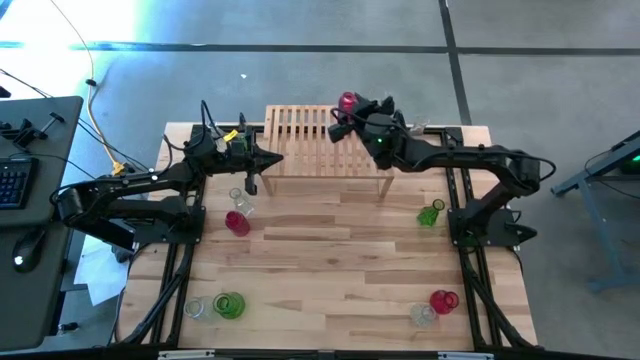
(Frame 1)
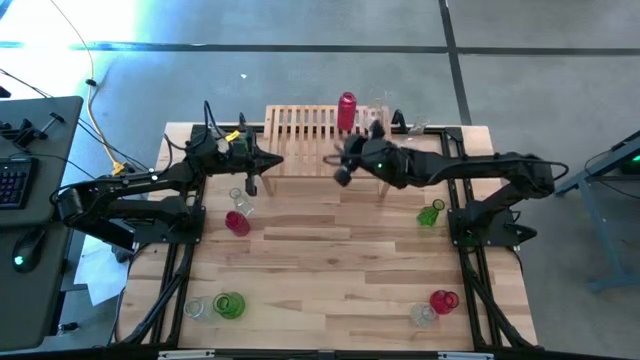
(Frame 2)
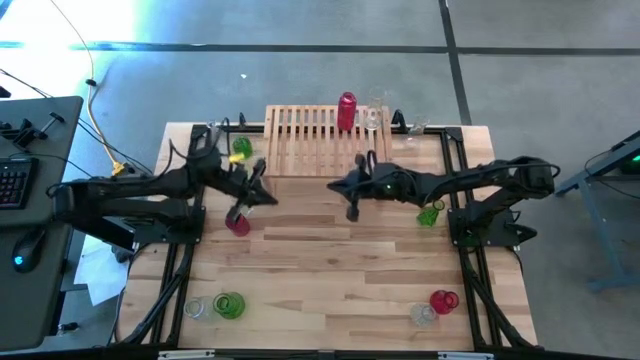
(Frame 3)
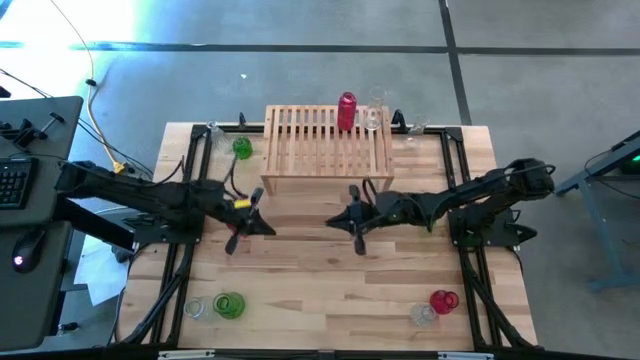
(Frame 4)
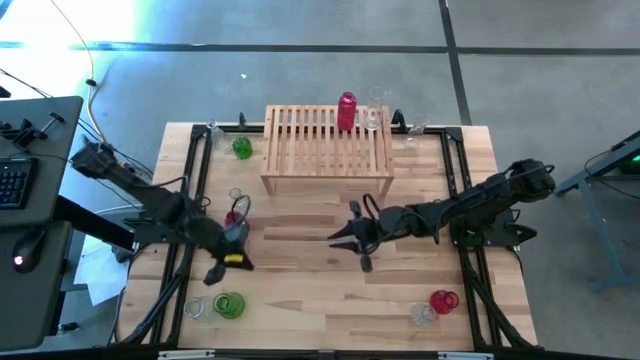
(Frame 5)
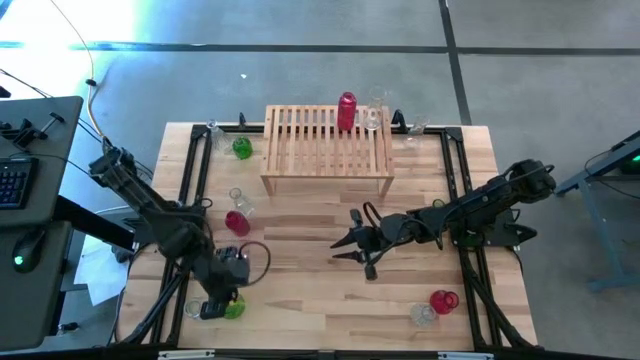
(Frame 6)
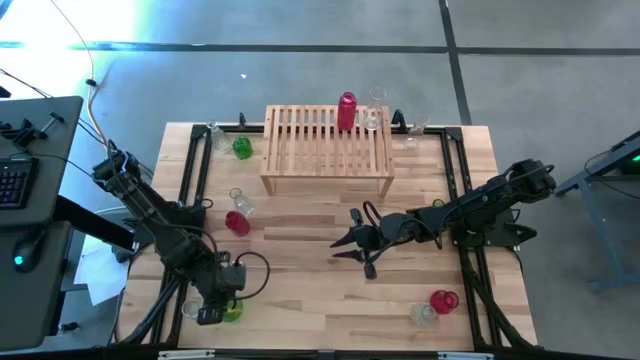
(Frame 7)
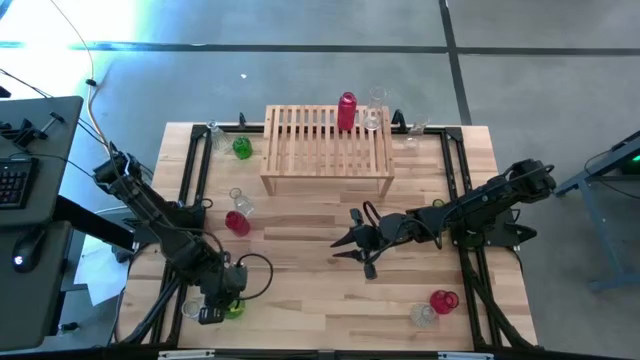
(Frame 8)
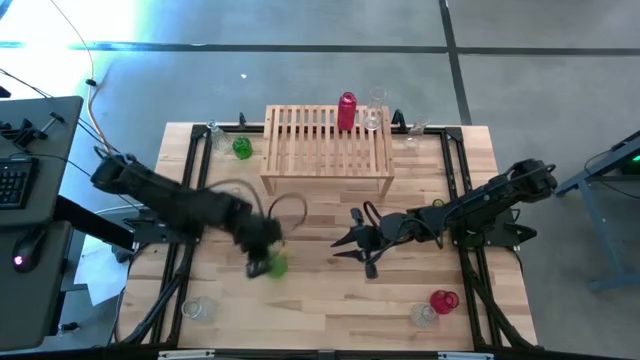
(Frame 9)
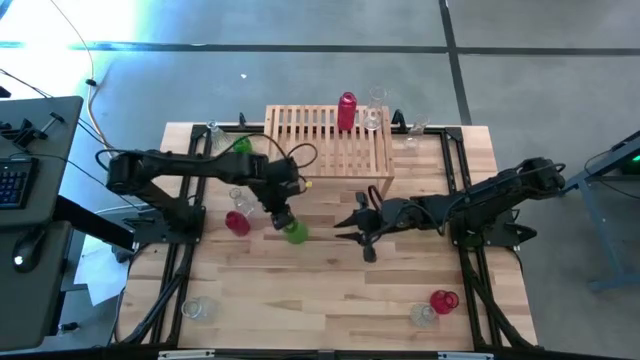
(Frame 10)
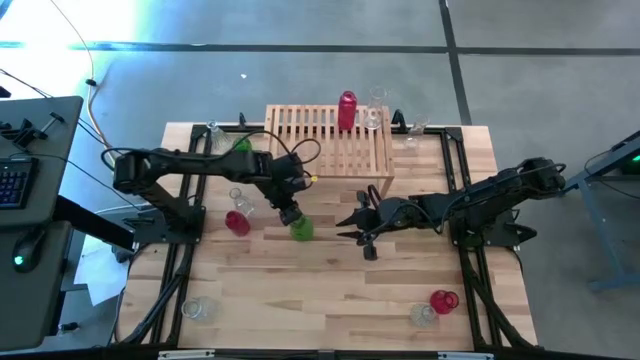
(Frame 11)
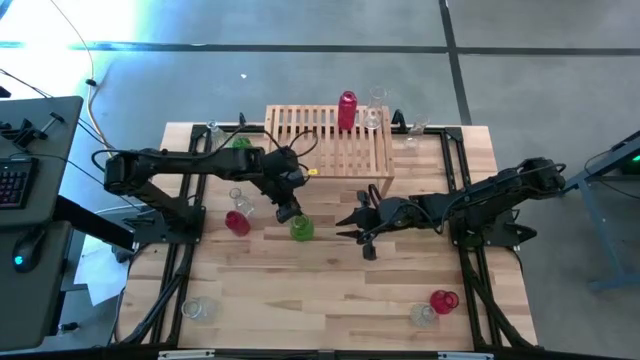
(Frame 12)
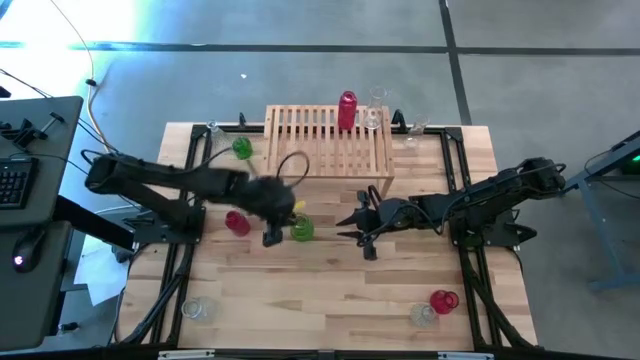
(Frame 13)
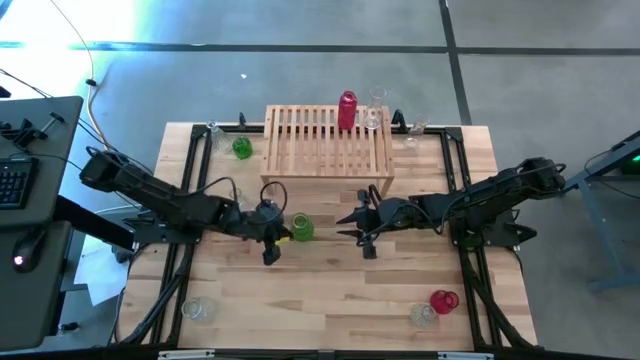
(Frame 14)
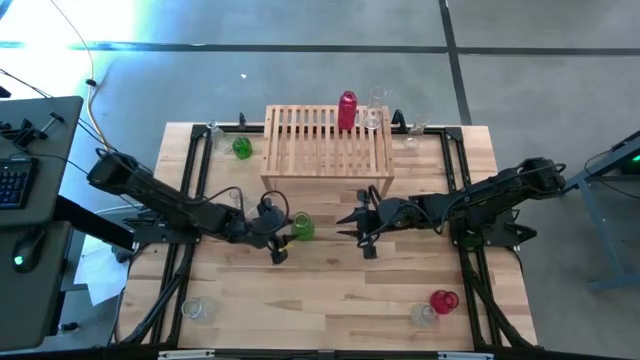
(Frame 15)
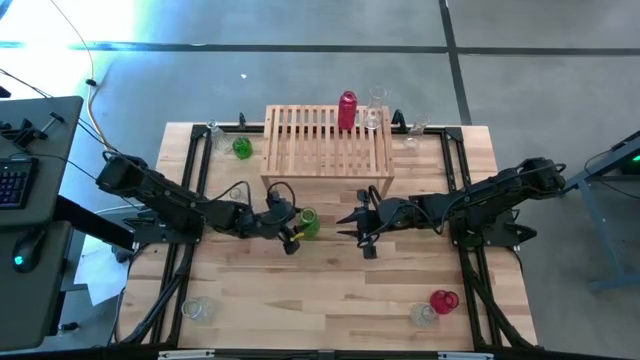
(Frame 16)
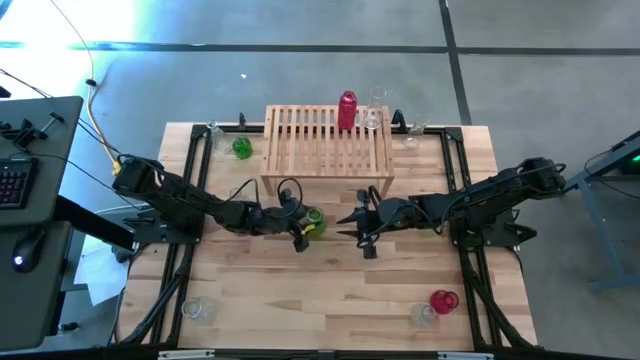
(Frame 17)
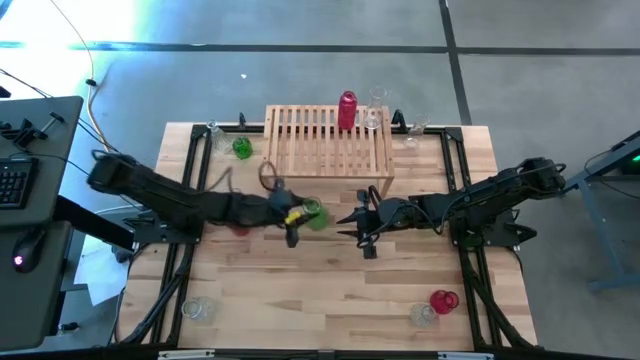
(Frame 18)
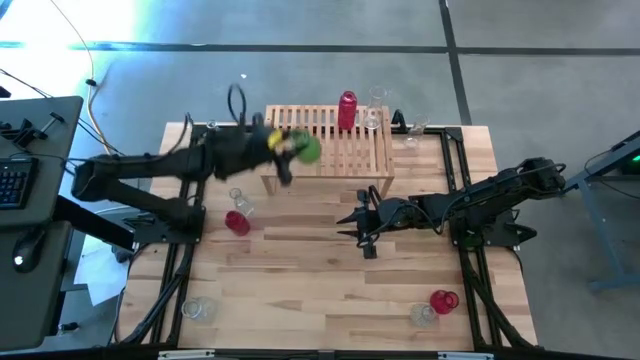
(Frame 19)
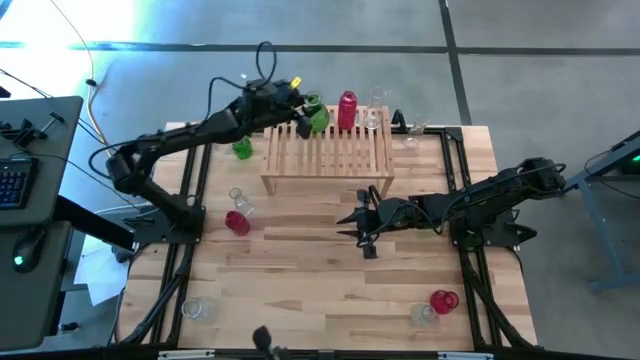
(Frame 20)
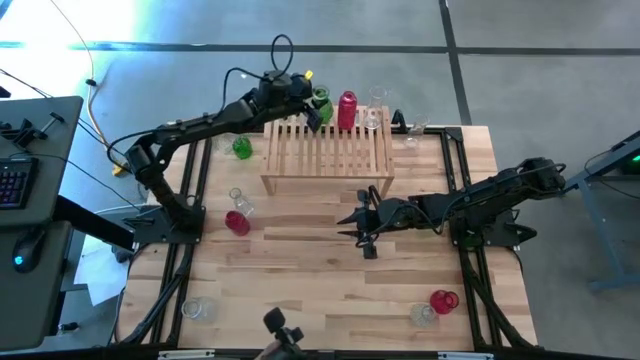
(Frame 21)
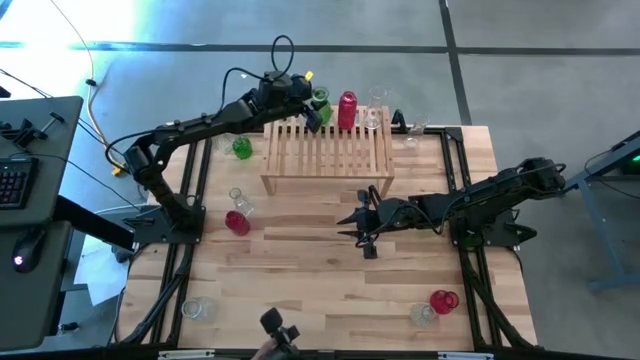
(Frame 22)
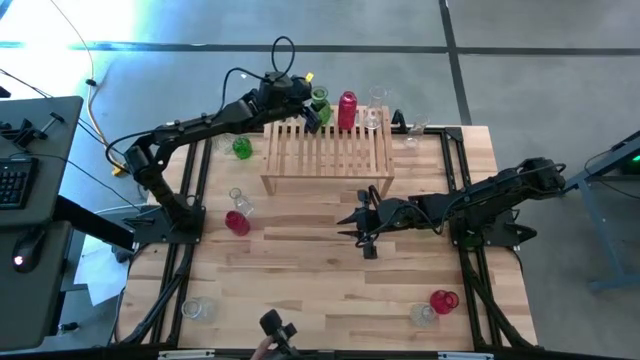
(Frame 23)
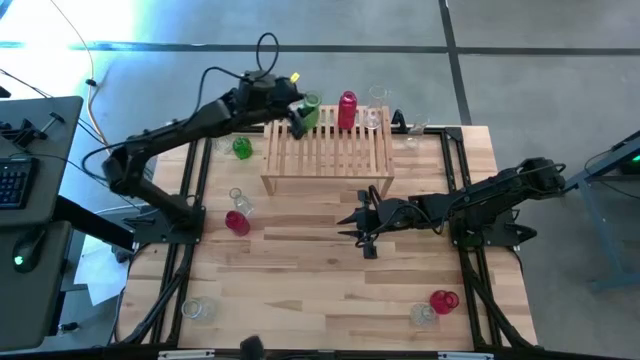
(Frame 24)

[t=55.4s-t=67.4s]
Task: sort vases onto shelf
Put the green vase on the shelf

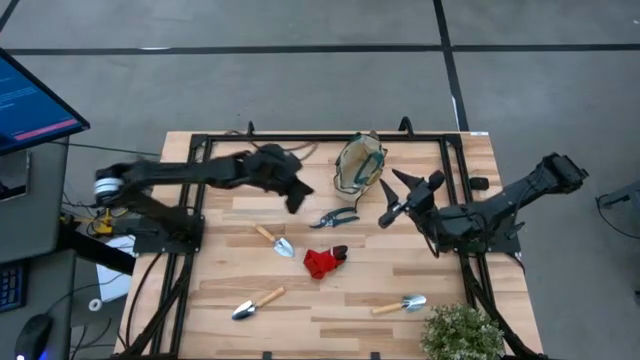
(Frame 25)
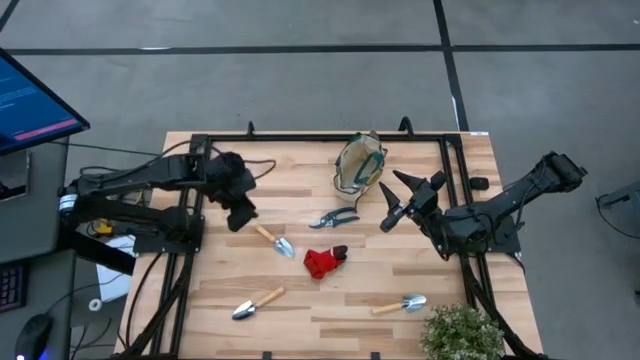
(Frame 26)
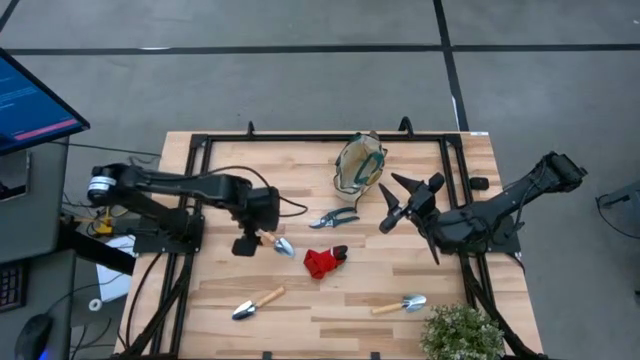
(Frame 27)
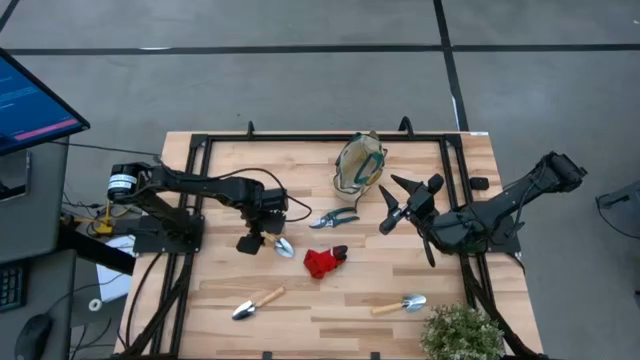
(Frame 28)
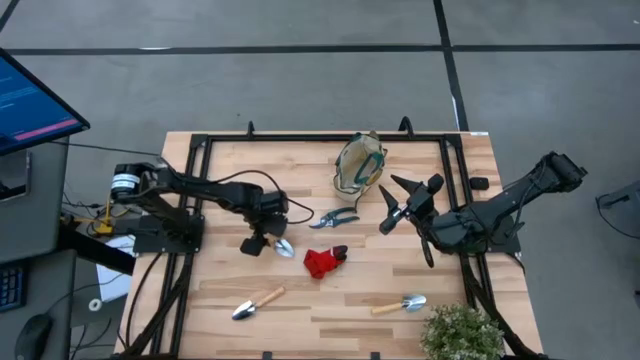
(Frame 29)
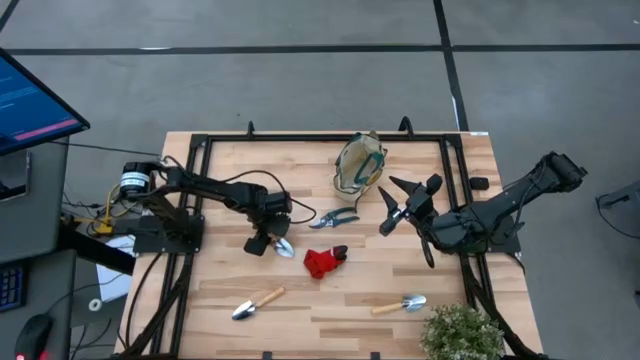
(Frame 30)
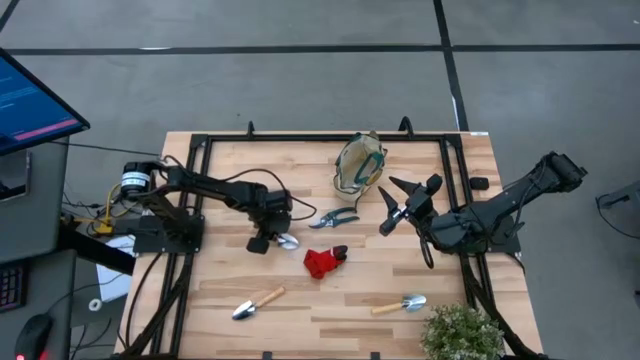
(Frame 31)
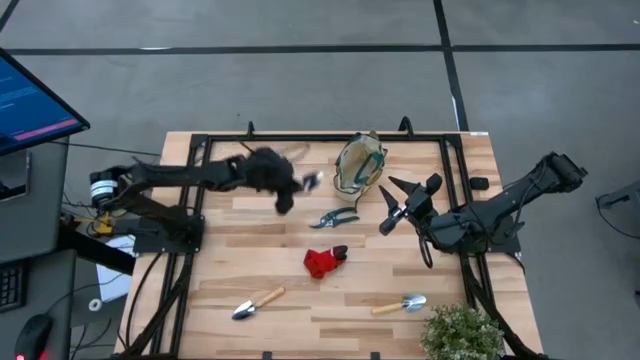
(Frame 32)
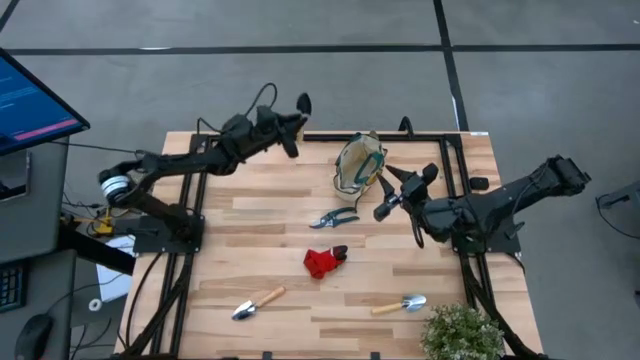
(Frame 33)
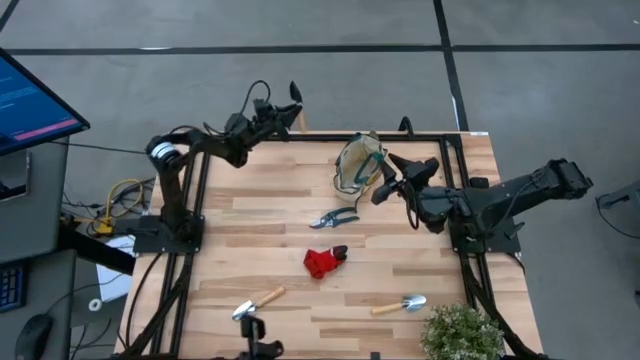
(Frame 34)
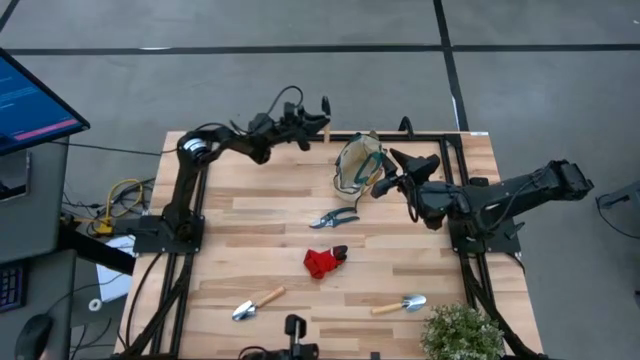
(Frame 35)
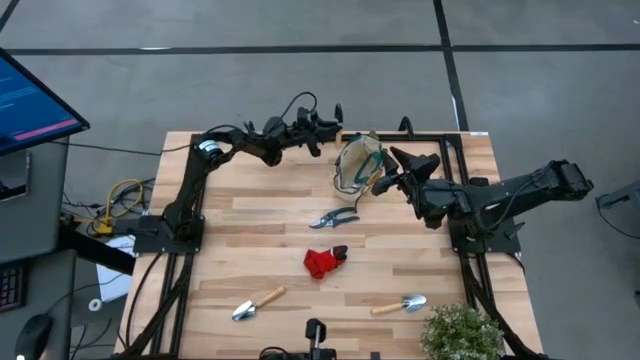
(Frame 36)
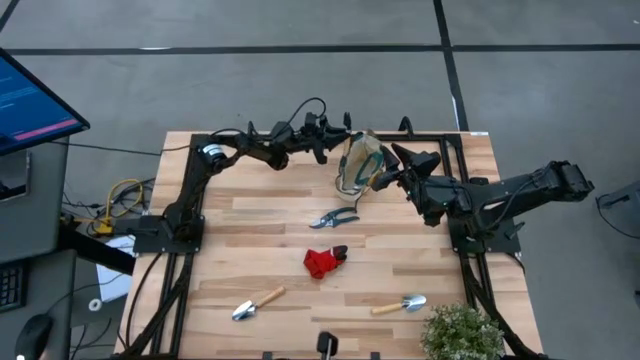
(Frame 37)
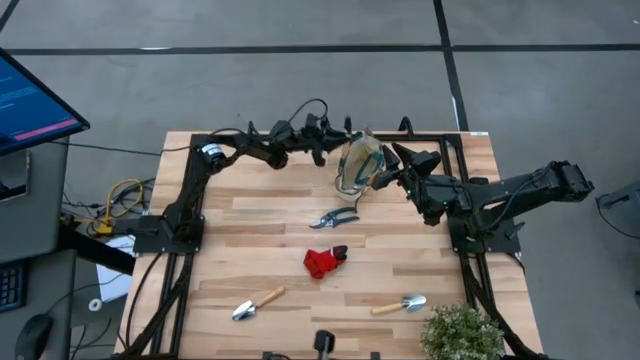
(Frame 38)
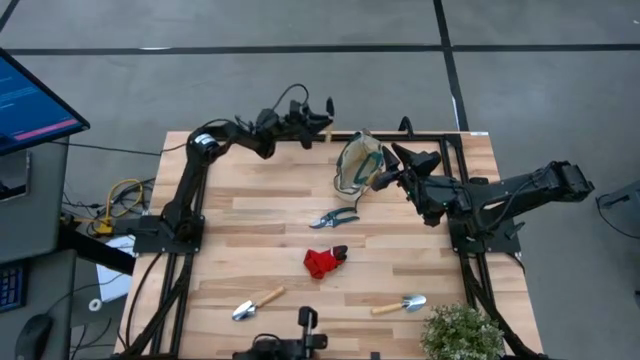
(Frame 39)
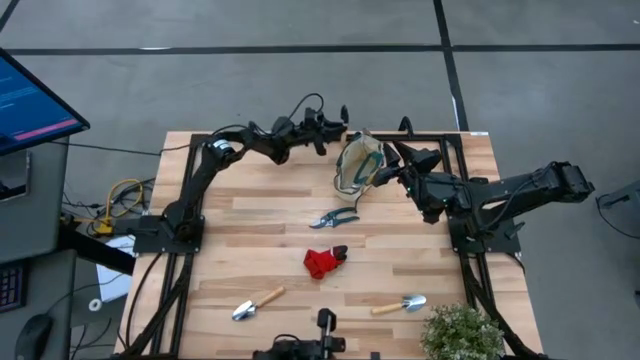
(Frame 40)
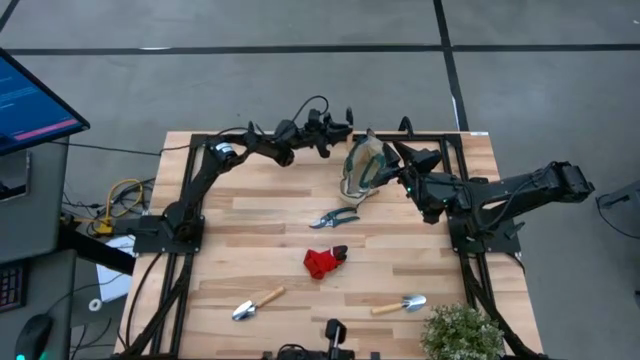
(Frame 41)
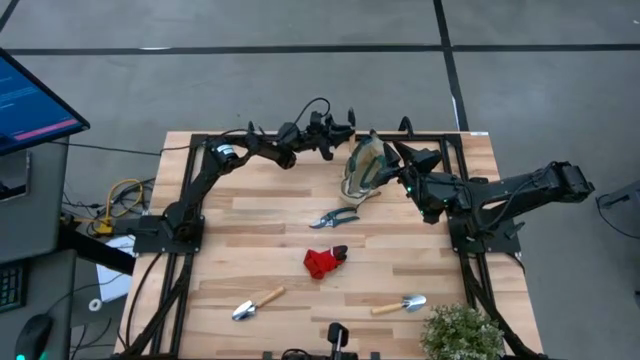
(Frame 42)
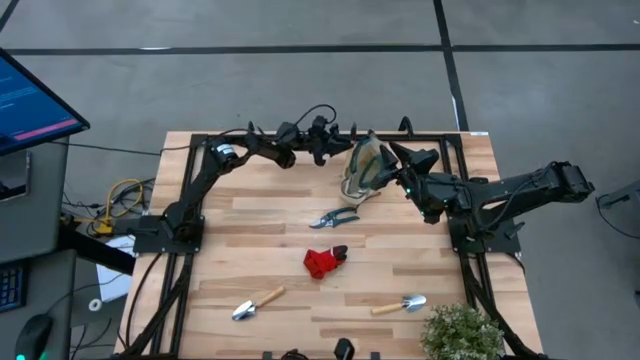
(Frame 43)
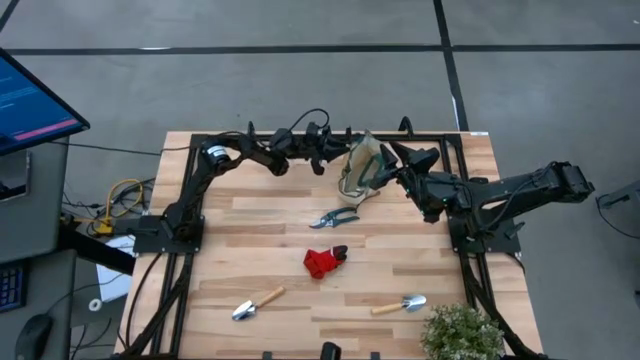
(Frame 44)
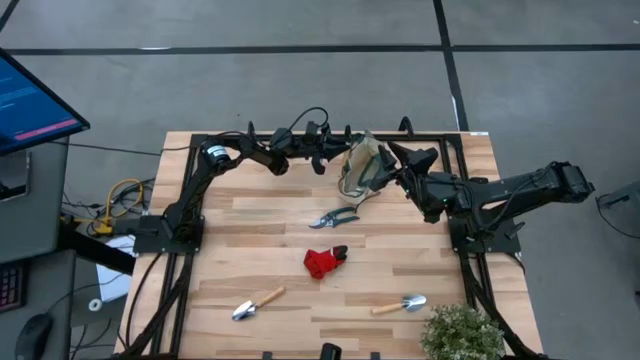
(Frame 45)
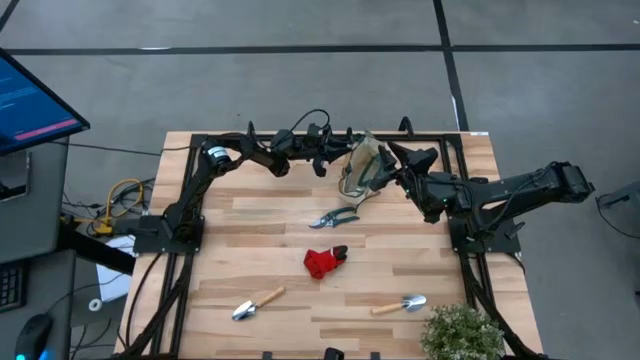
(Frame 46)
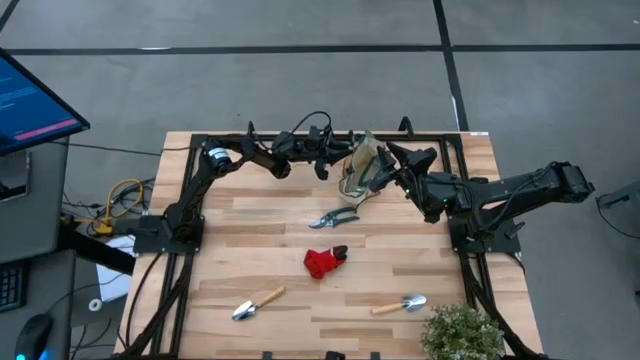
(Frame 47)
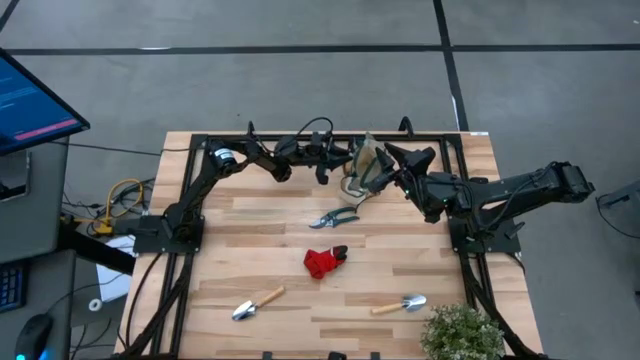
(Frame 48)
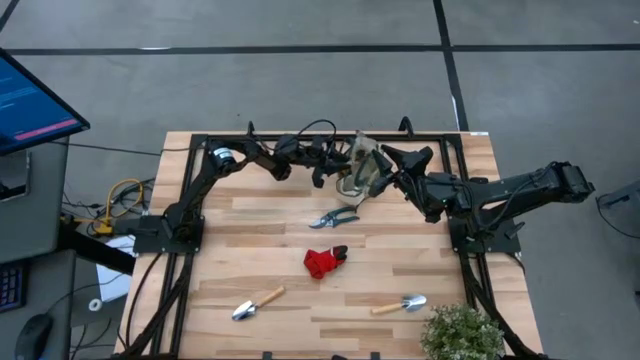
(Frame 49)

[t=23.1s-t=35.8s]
Task: Pick & Place Garden tools in Gardening bag
Put the trowel into the side pocket of the gardening bag
